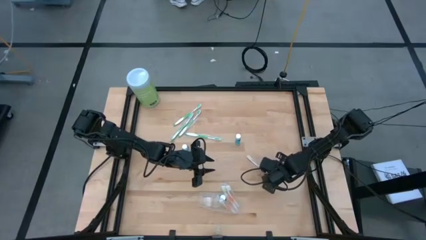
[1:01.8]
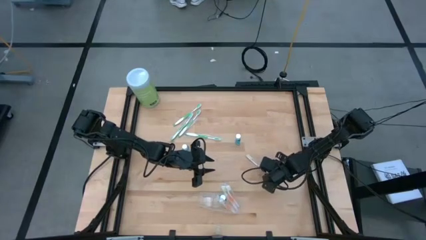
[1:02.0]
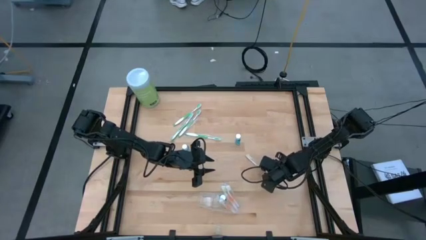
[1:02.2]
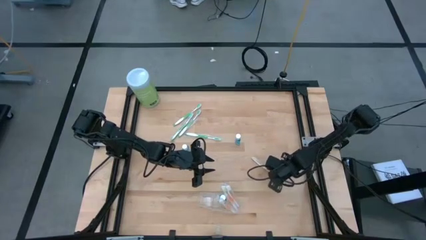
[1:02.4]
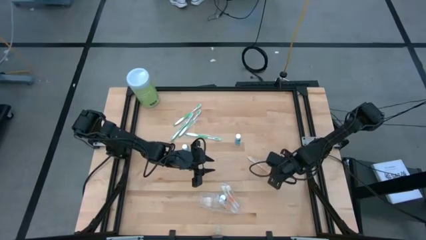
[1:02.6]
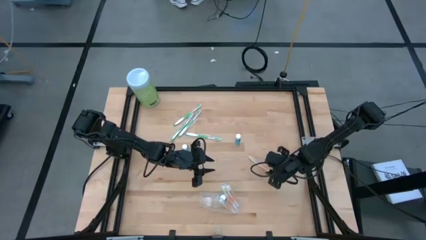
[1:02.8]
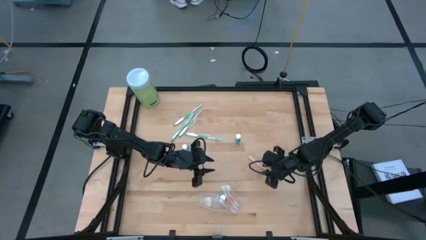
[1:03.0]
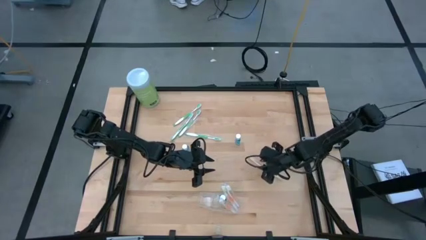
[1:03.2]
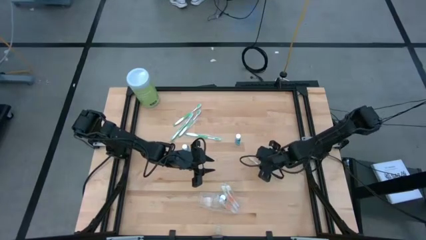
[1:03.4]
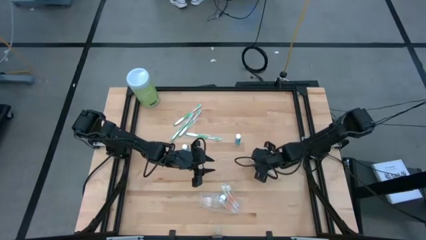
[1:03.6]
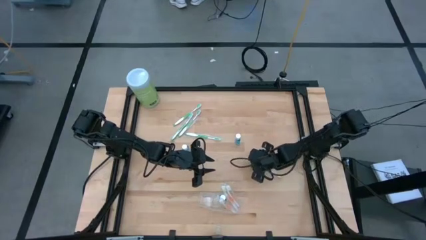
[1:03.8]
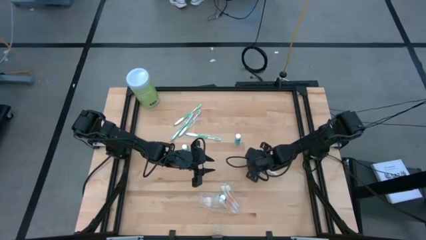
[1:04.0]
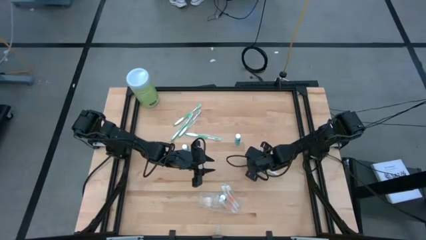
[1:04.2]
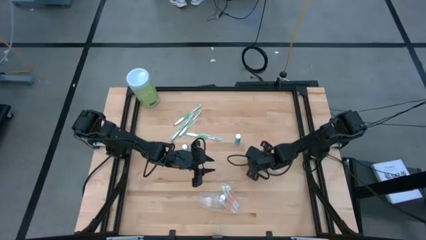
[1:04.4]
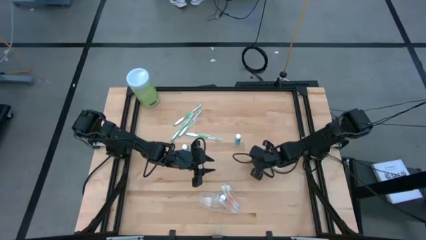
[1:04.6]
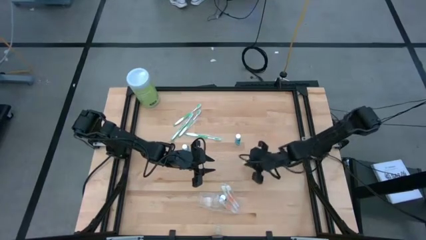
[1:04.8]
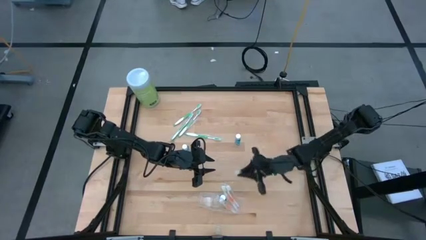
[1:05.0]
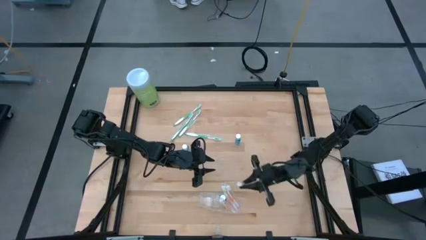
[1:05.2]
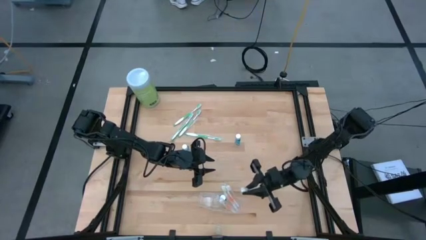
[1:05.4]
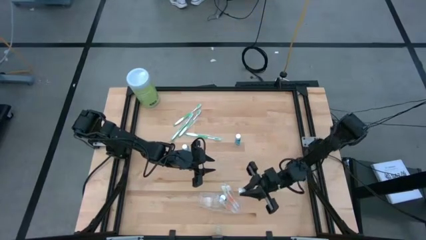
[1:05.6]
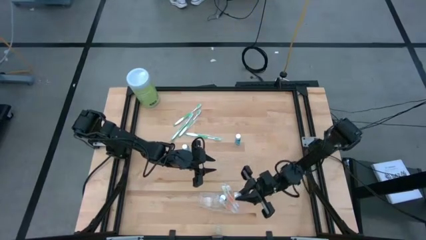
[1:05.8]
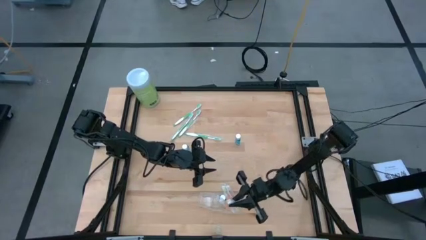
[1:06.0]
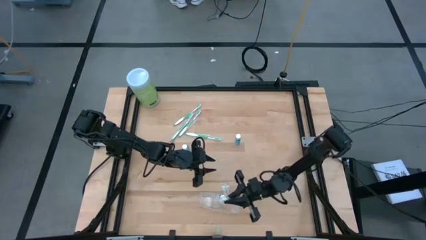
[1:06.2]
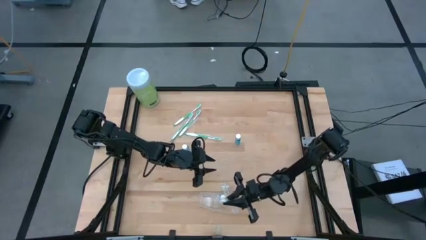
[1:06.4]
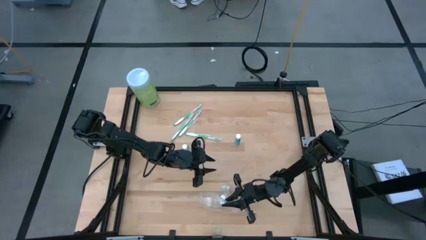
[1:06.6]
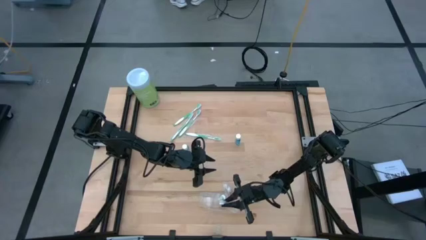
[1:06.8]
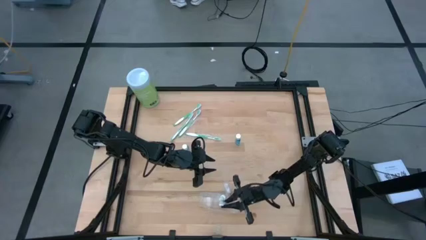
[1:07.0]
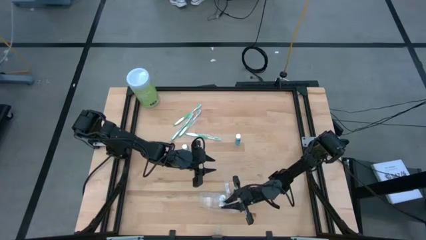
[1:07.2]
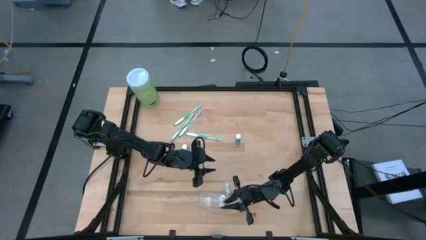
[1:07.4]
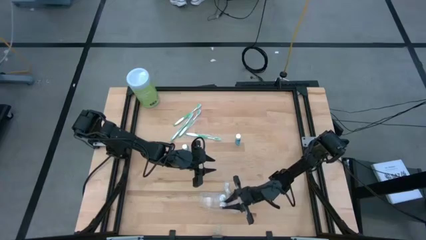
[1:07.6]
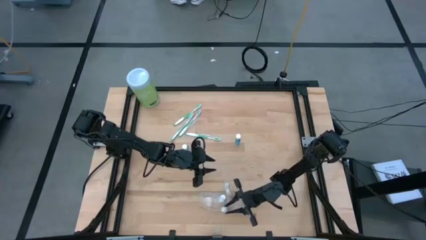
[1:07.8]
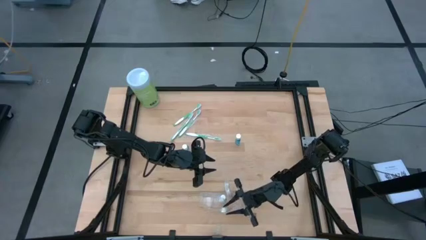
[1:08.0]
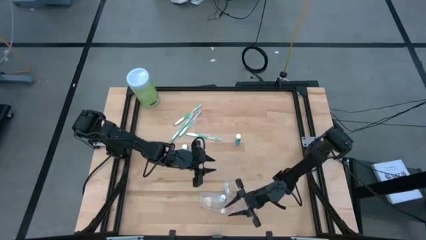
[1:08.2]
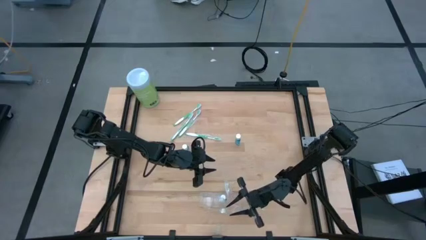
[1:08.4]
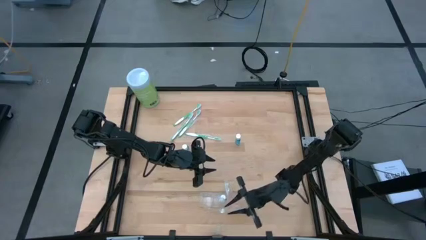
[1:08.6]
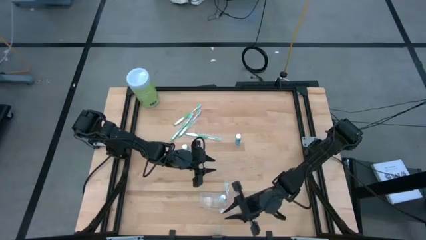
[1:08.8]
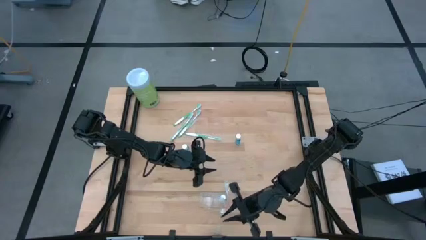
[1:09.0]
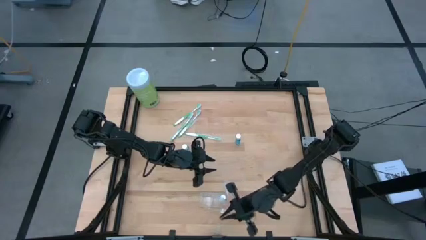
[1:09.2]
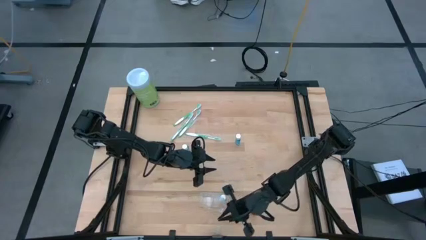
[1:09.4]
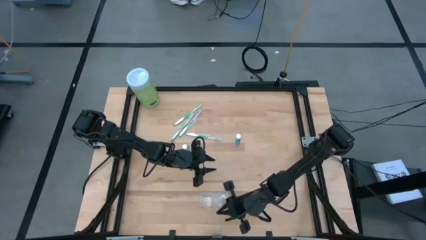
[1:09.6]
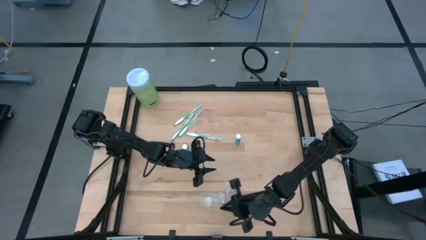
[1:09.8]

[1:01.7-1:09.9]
Task: Pick & Place toothbrushing station
Put the orange toothbrush into the transparent organizer

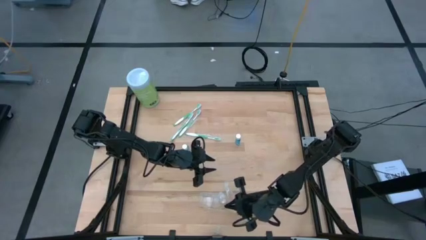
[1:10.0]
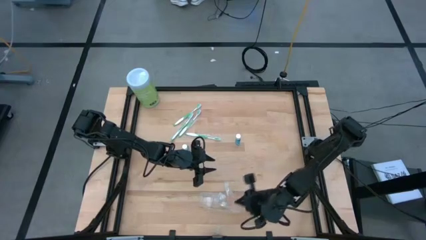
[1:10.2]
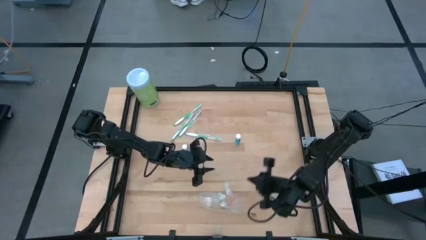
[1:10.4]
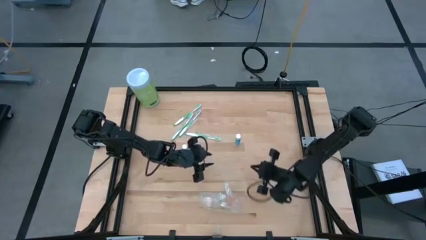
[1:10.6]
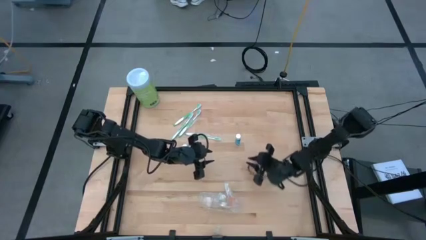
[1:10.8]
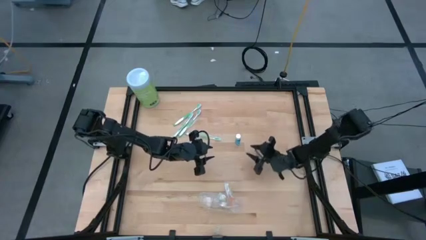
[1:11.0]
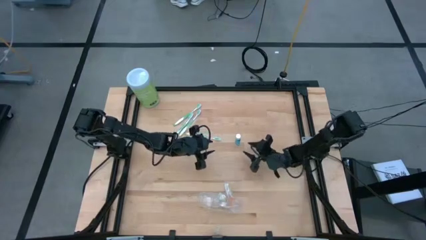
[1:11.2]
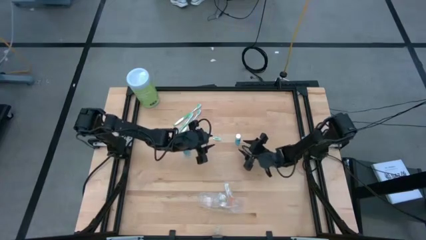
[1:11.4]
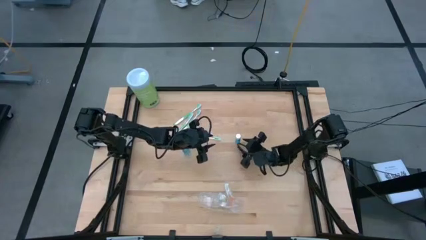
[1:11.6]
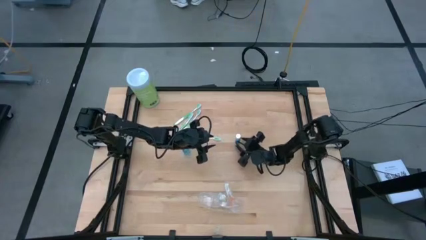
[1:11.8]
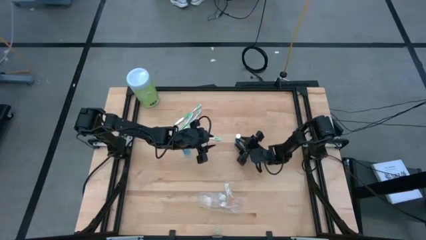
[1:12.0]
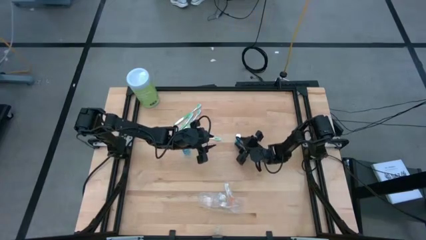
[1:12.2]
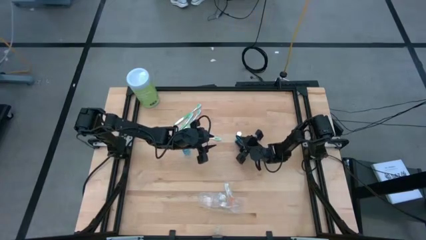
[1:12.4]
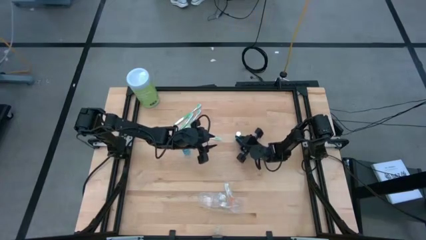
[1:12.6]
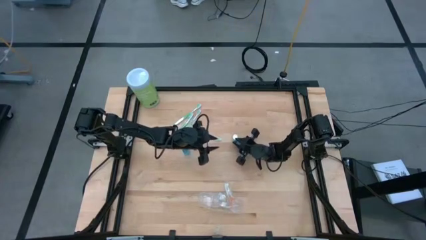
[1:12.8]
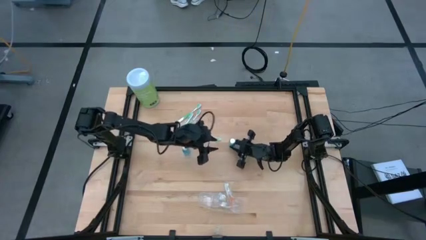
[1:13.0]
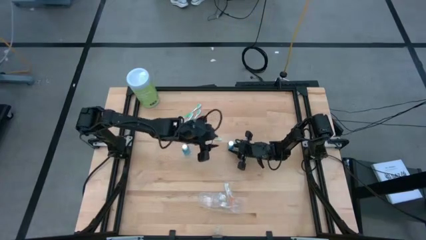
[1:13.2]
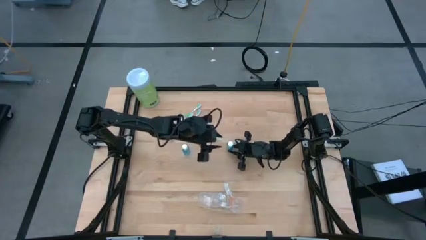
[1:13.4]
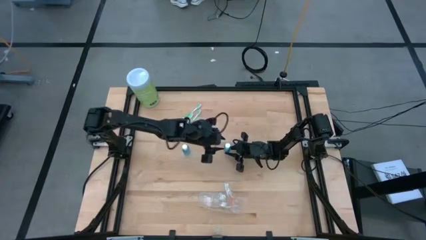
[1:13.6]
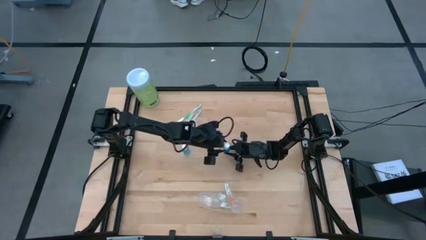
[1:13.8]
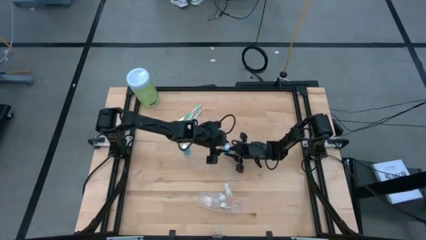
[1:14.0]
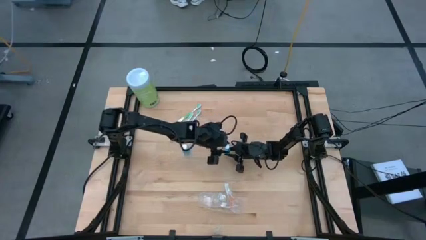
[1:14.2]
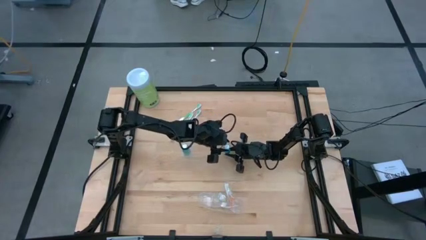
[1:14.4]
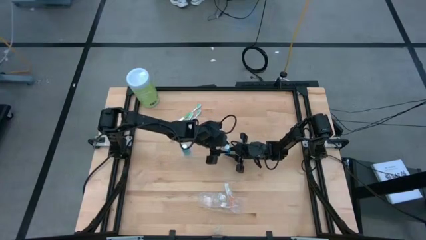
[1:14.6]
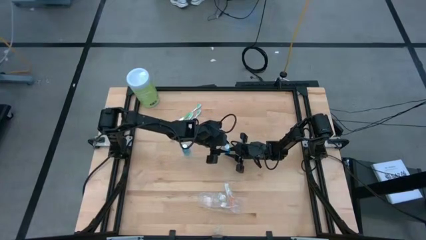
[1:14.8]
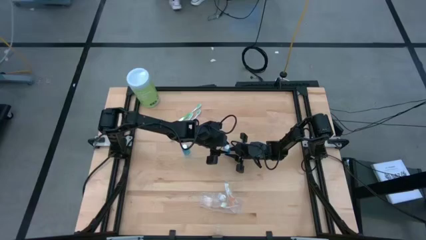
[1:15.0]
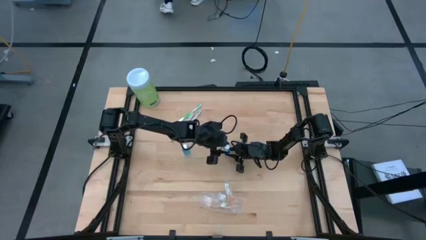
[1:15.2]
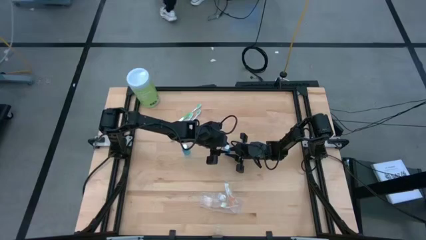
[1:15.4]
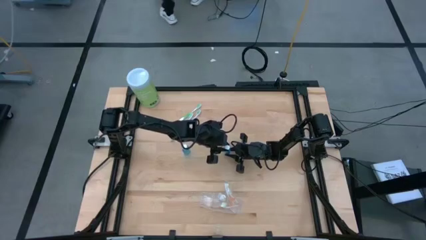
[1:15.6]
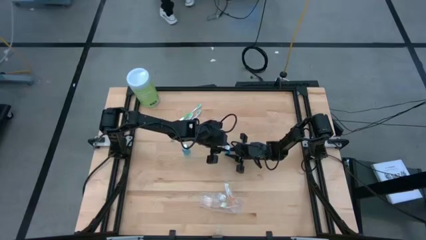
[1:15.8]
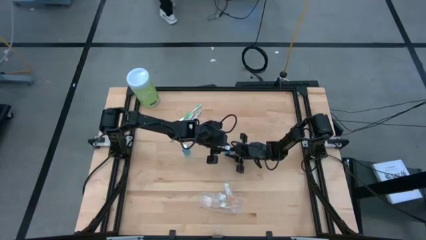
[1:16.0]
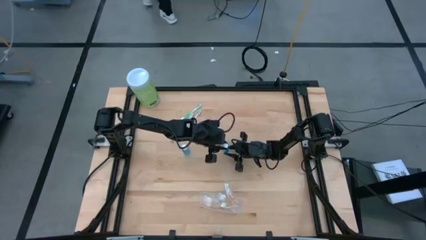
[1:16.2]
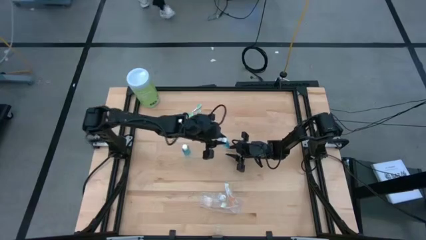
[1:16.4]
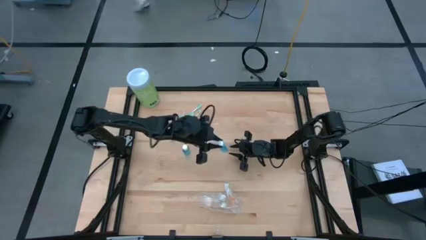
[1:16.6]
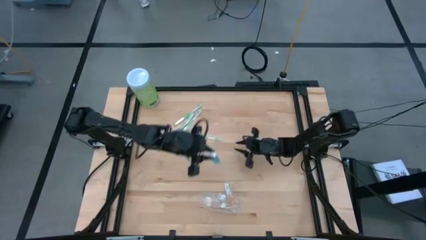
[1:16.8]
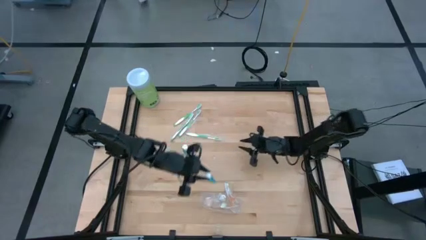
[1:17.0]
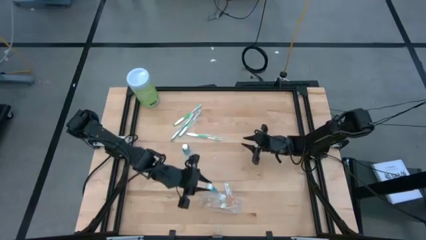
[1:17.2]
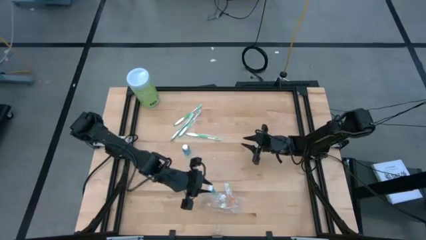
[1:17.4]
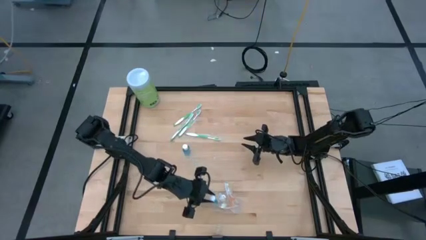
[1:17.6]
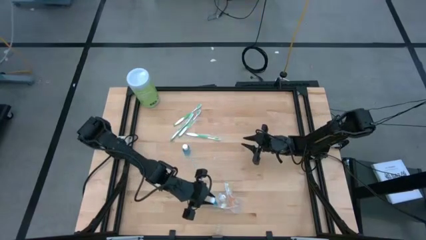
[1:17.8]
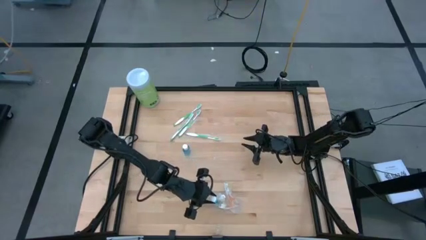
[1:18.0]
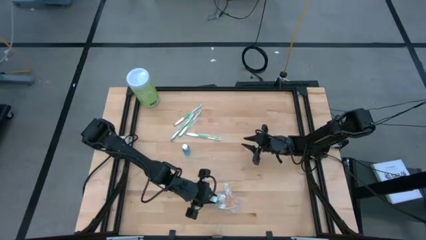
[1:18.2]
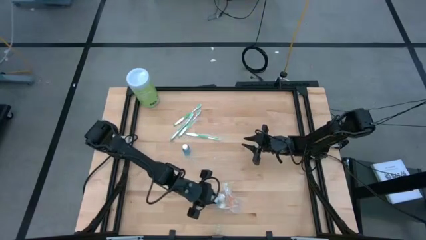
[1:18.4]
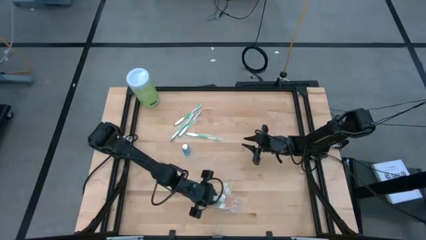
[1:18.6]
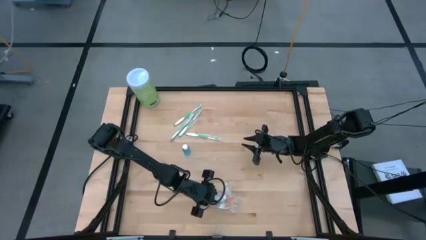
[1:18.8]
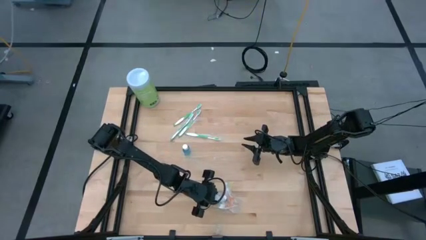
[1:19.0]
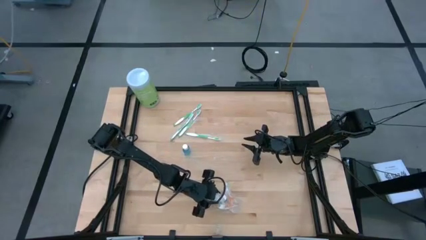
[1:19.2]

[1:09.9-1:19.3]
Put the mouthwash bottle into the transparent organizer
